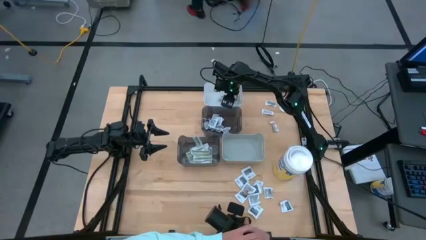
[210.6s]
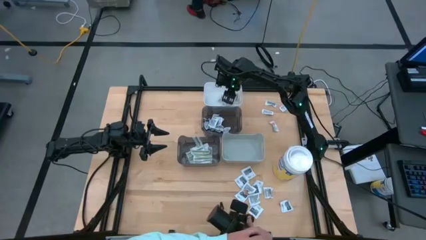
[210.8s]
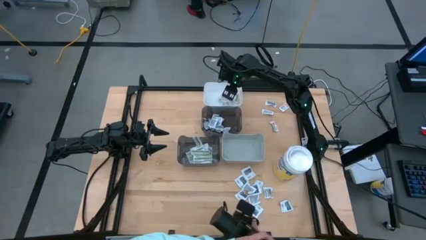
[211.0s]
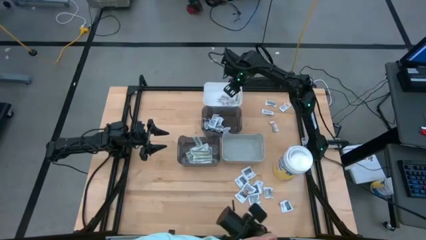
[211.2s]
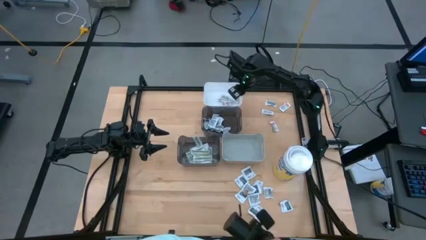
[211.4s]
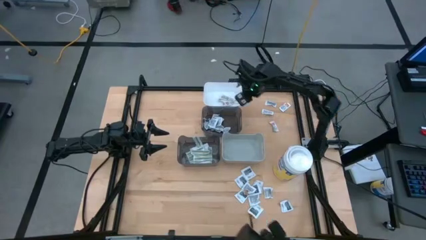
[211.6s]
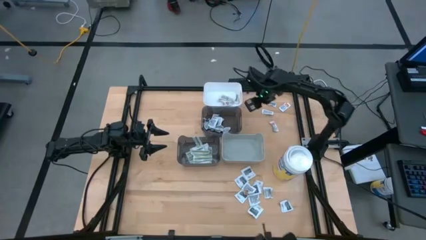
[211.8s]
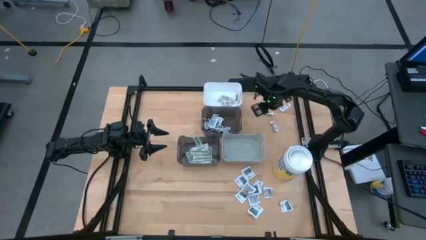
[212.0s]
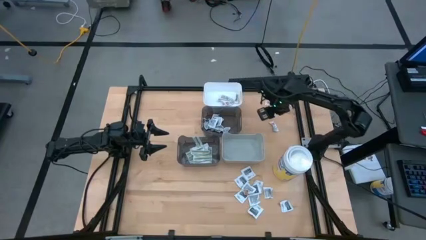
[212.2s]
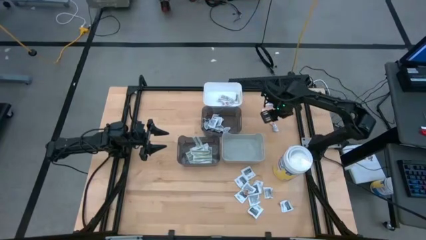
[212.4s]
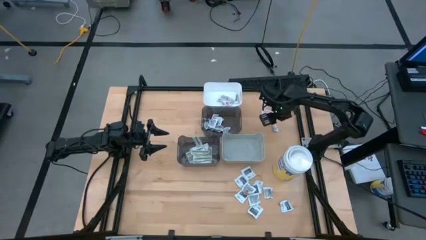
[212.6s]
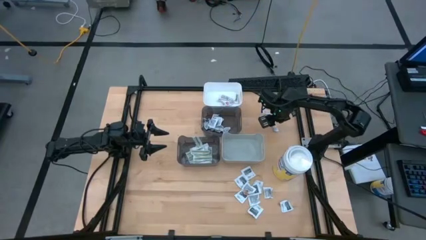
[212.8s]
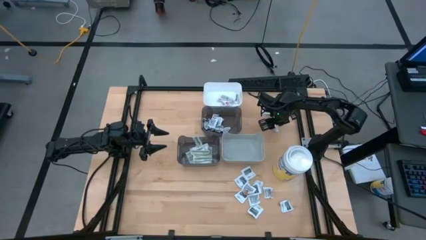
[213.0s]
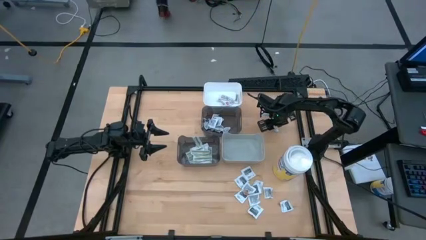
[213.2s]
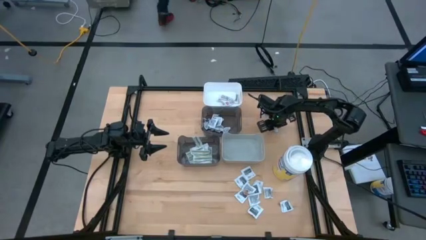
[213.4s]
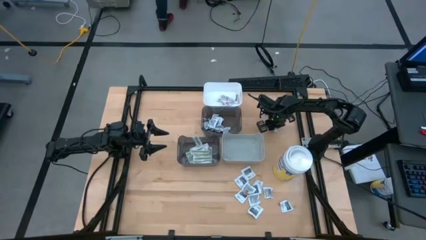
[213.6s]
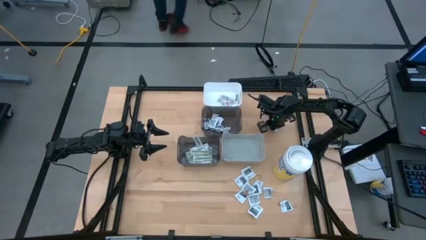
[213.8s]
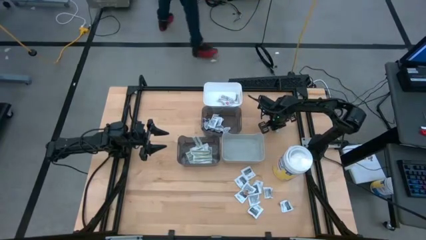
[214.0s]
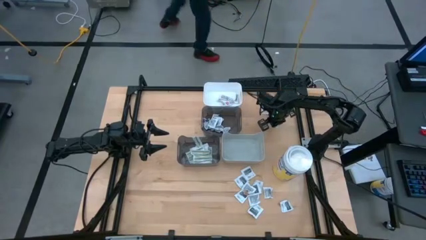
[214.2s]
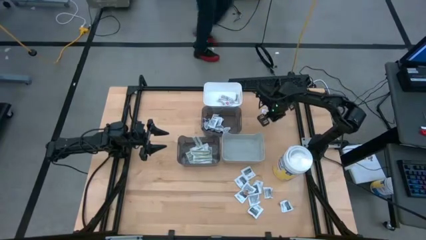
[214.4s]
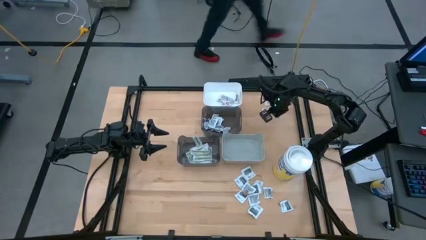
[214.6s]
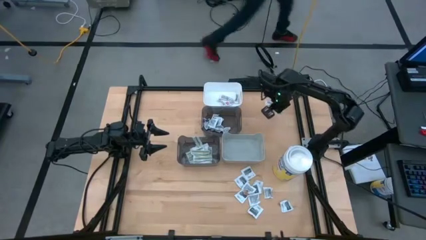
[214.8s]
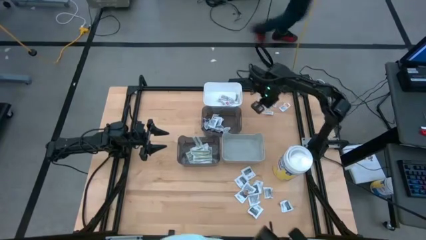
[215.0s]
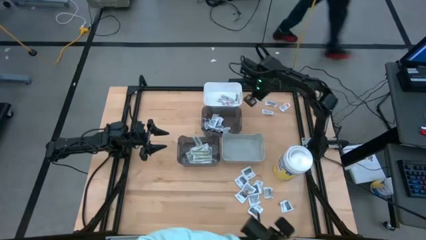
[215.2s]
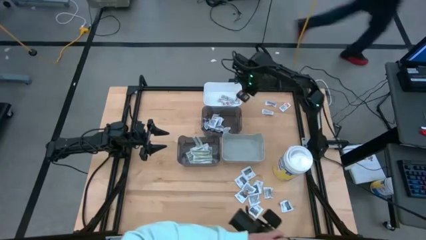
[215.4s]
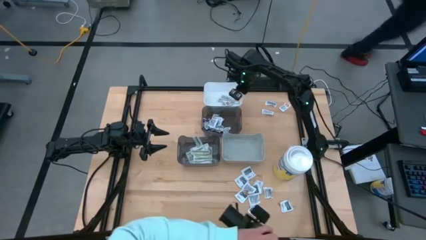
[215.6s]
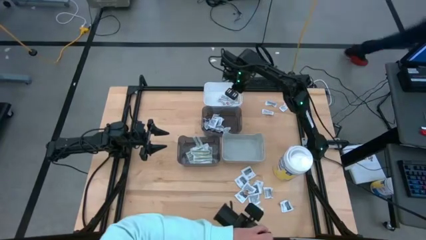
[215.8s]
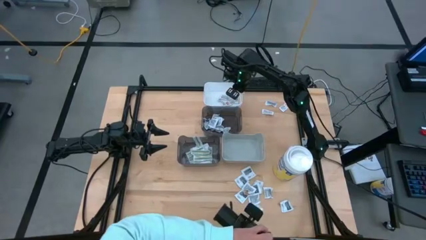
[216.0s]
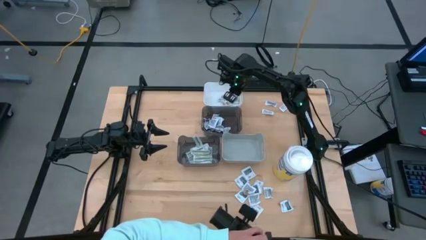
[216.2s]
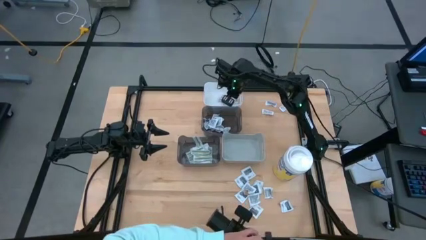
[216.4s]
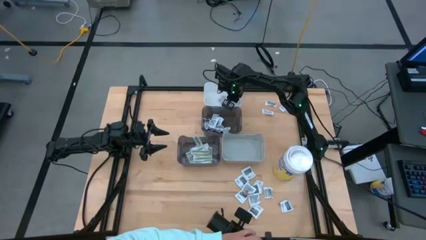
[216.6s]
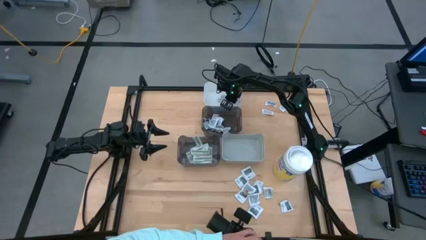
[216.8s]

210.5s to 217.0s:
Task: Pick & Place First Aid Supplies
Put the white ointment pack into the white bin

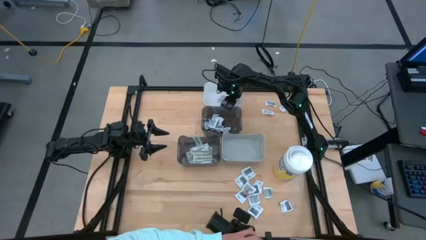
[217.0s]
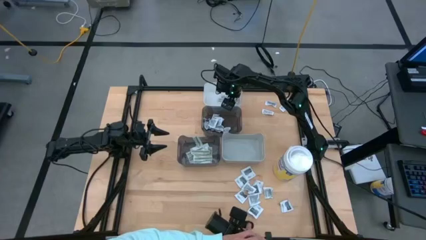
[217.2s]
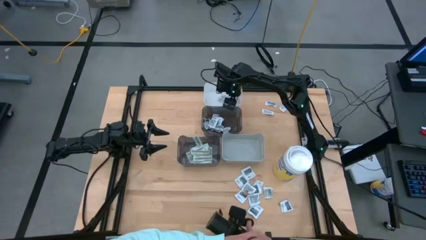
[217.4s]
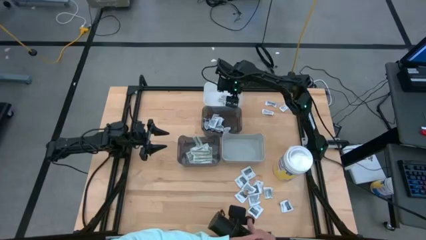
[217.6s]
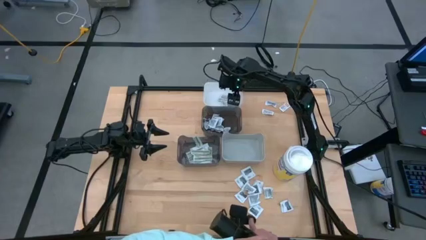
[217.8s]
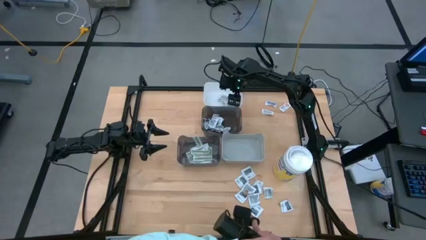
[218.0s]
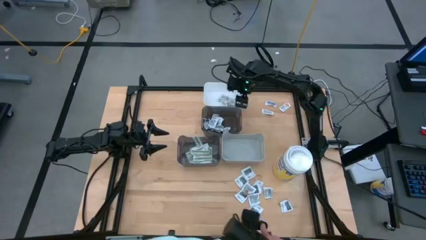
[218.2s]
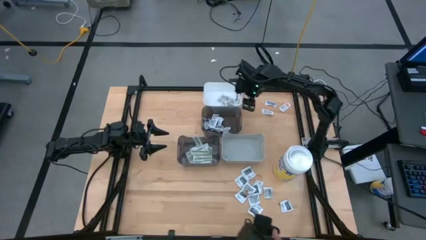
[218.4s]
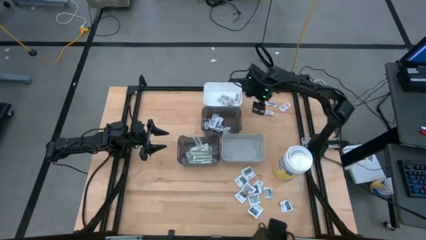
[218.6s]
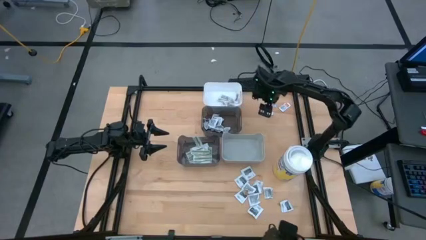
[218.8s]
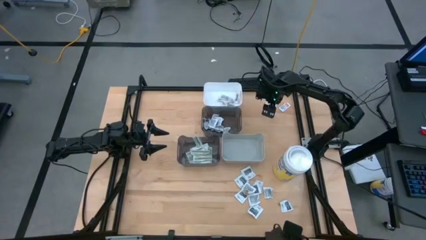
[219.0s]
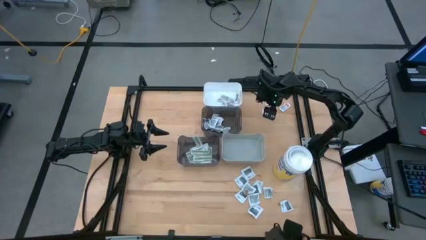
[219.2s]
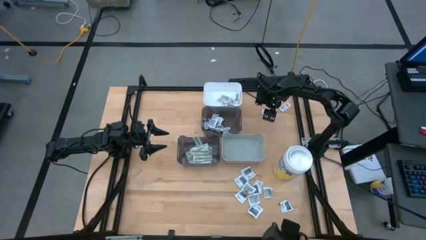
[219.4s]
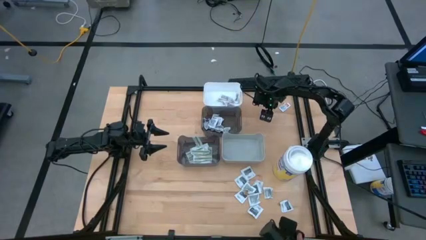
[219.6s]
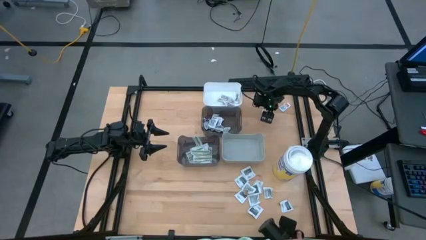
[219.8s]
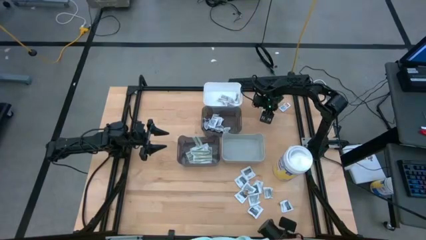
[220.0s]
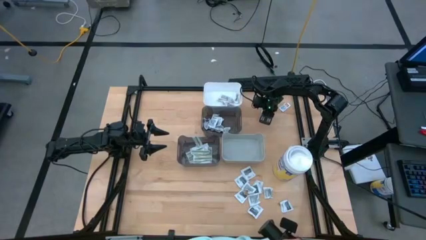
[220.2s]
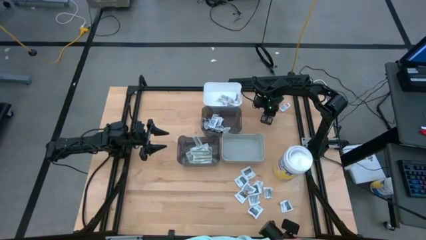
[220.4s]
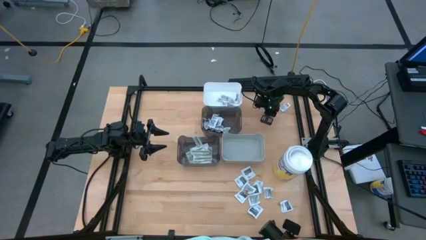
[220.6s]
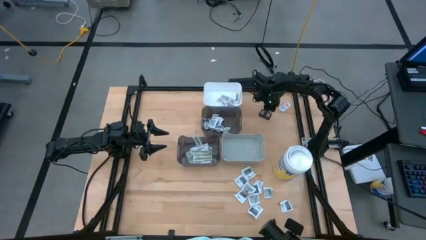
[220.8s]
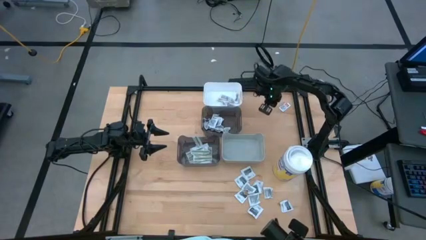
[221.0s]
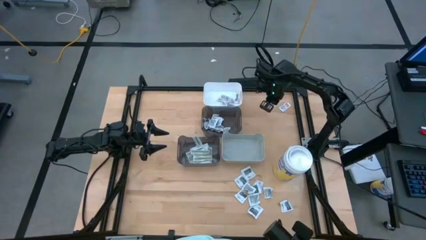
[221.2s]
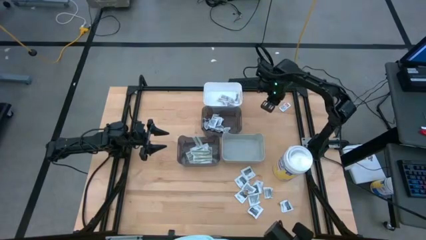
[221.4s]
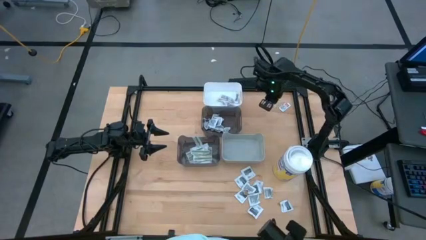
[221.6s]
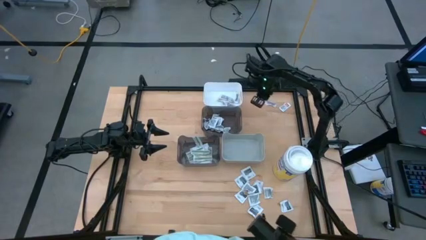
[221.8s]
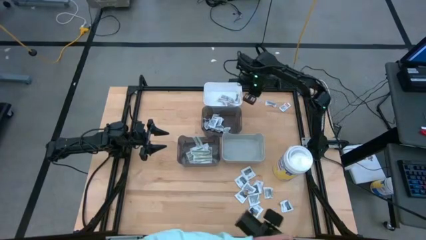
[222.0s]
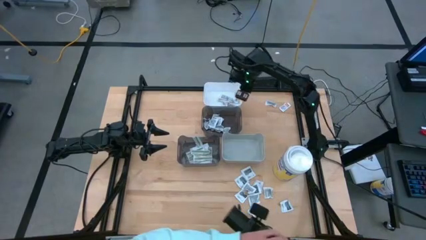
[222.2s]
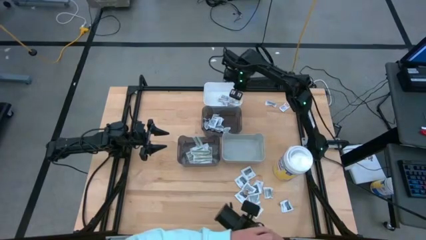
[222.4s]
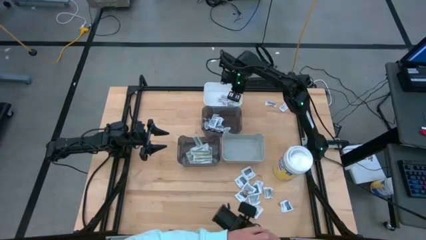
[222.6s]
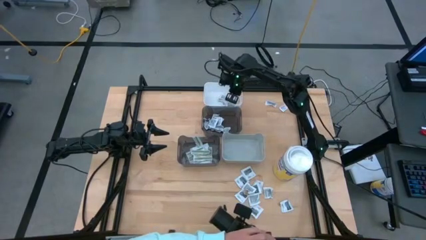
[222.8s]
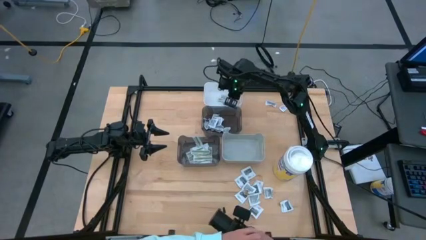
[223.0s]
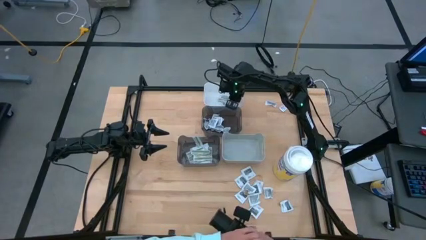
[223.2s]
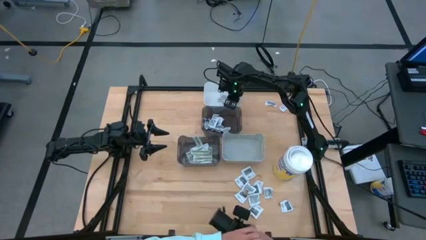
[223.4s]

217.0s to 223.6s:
Put the white ointment pack into the white bin
